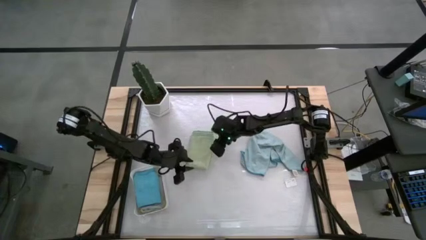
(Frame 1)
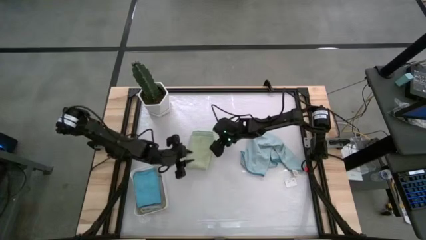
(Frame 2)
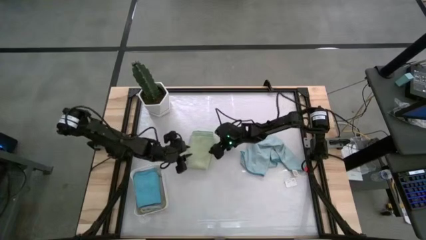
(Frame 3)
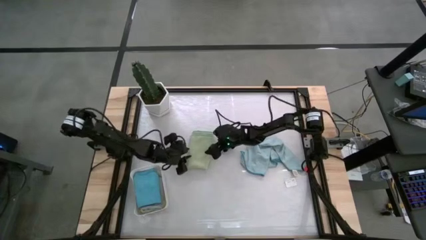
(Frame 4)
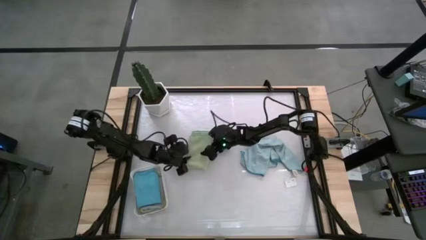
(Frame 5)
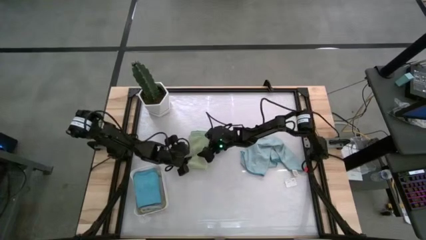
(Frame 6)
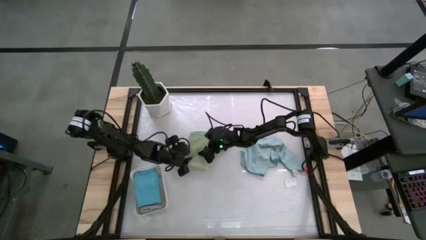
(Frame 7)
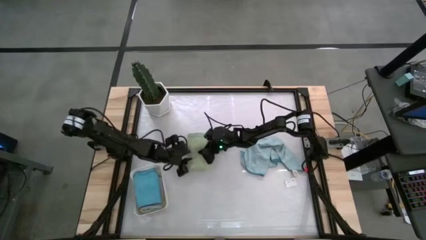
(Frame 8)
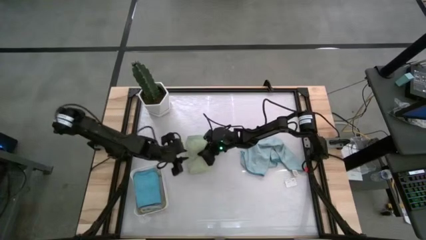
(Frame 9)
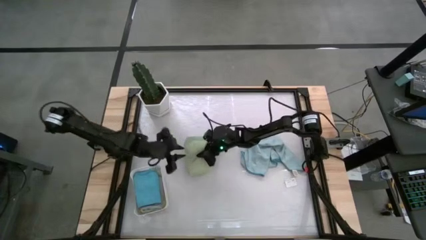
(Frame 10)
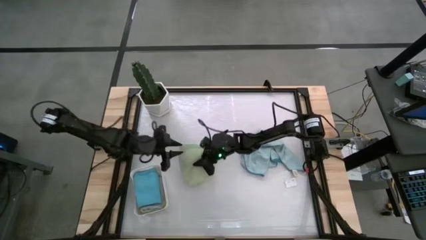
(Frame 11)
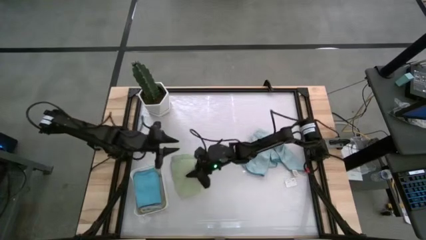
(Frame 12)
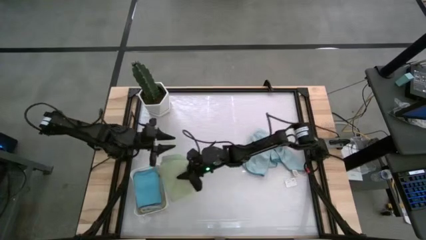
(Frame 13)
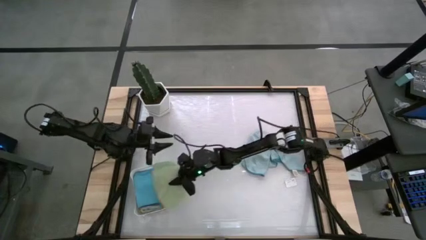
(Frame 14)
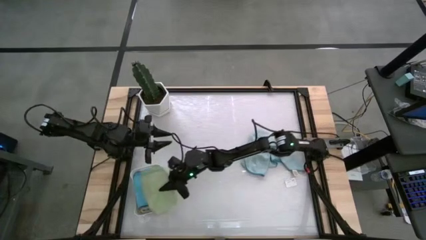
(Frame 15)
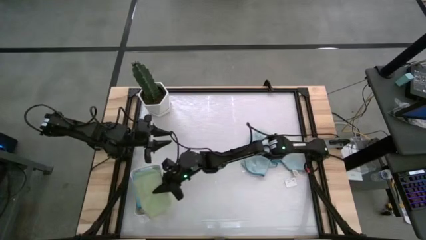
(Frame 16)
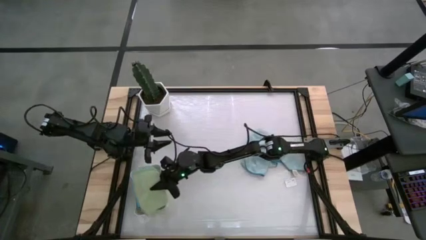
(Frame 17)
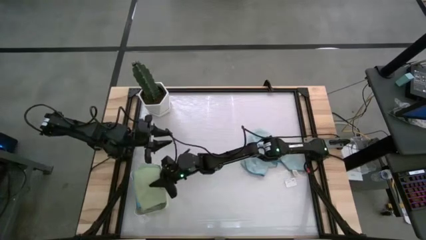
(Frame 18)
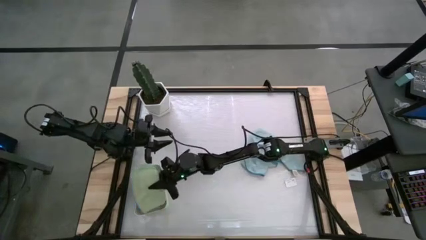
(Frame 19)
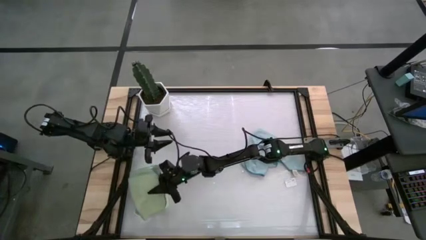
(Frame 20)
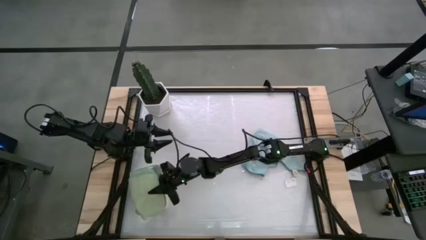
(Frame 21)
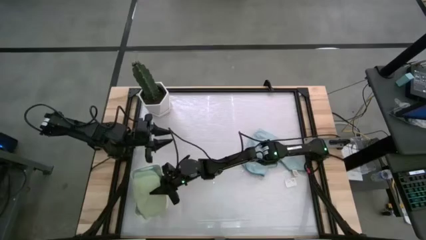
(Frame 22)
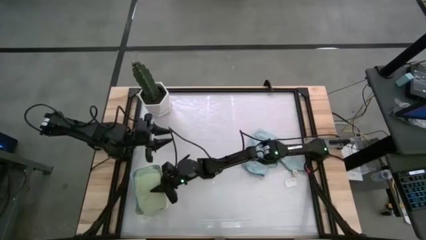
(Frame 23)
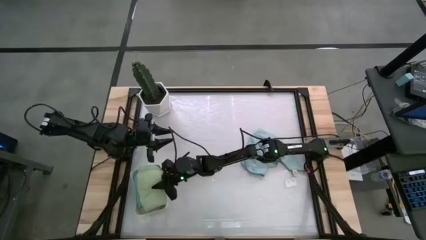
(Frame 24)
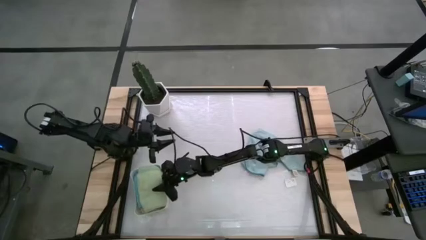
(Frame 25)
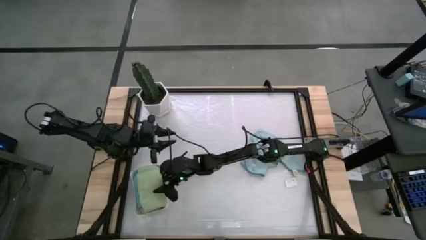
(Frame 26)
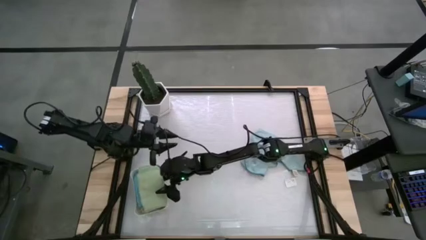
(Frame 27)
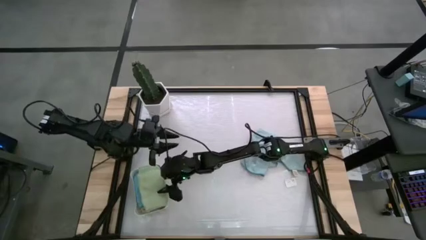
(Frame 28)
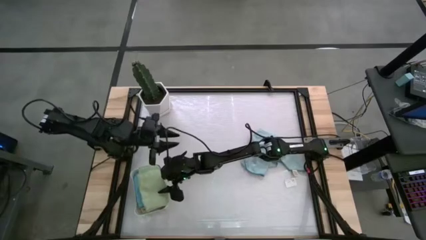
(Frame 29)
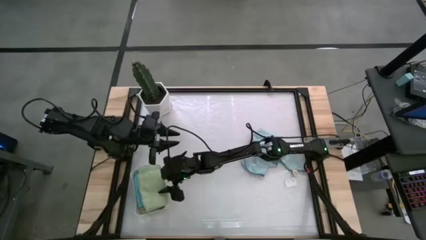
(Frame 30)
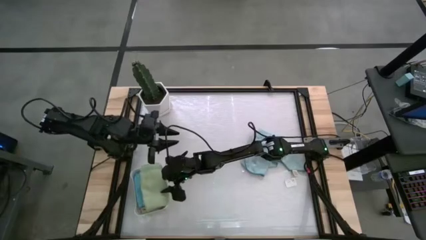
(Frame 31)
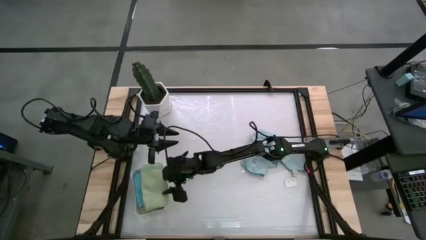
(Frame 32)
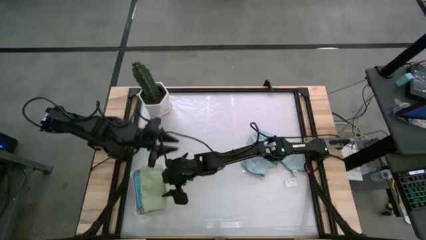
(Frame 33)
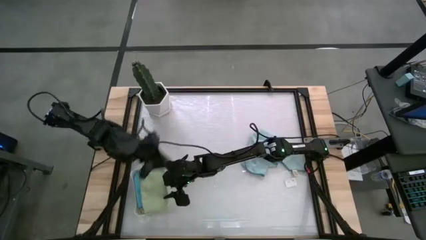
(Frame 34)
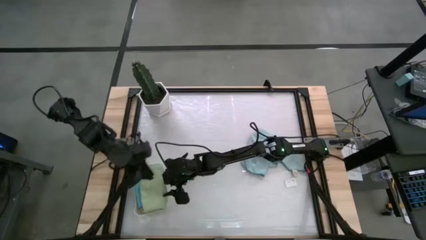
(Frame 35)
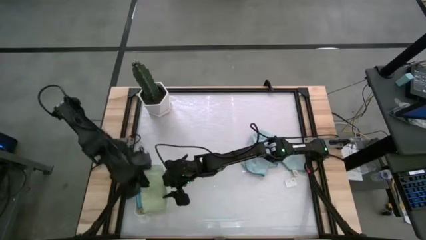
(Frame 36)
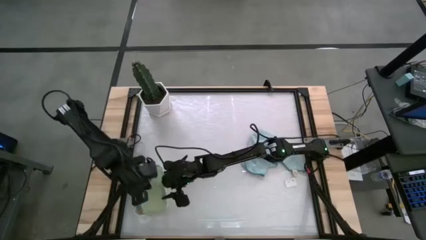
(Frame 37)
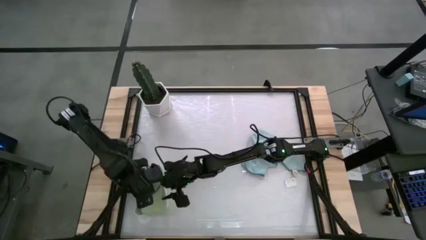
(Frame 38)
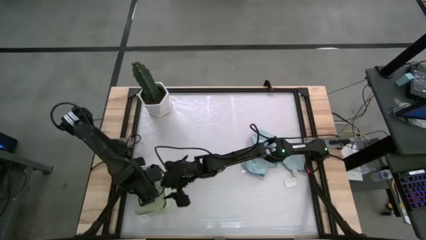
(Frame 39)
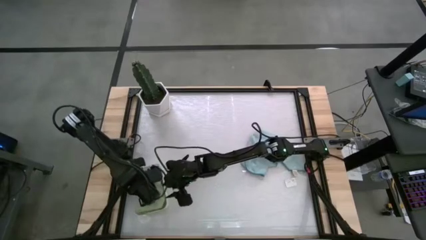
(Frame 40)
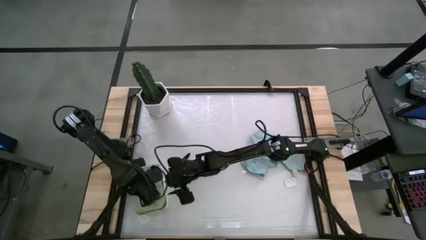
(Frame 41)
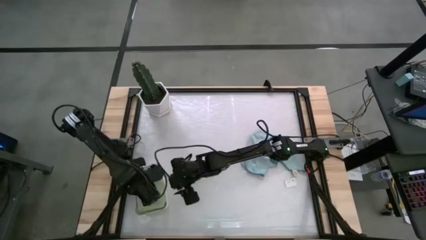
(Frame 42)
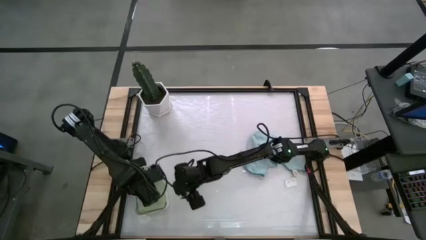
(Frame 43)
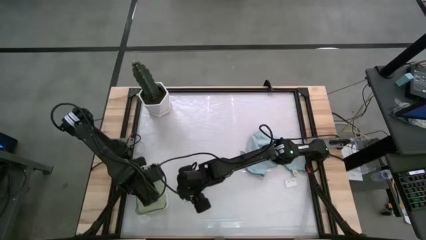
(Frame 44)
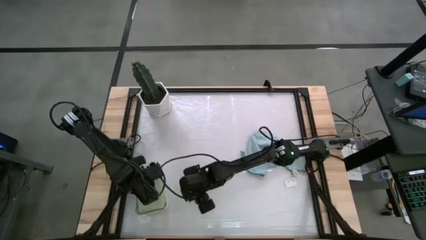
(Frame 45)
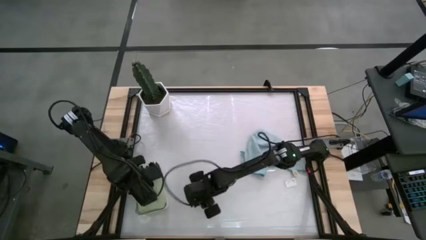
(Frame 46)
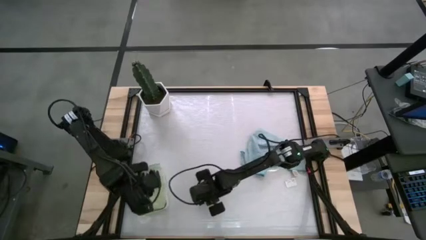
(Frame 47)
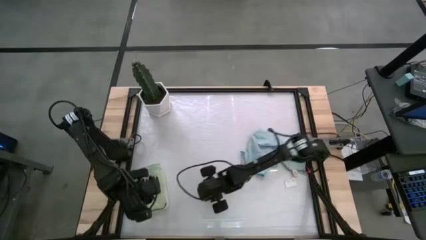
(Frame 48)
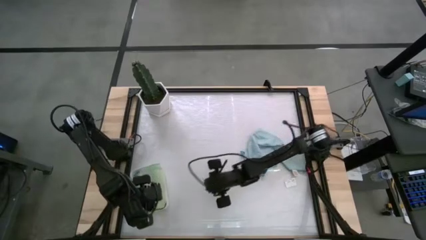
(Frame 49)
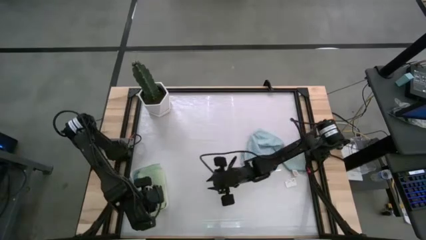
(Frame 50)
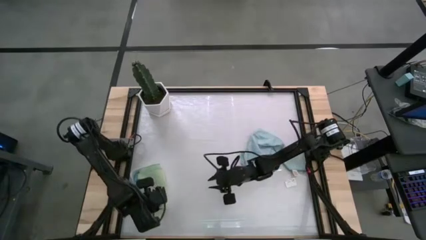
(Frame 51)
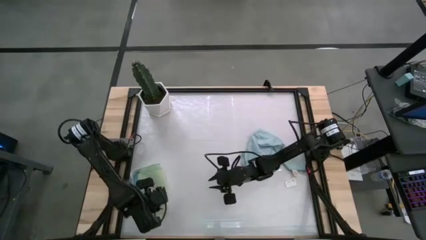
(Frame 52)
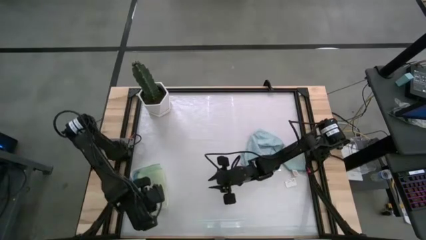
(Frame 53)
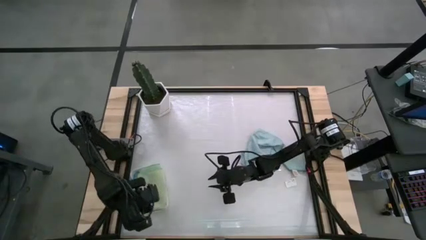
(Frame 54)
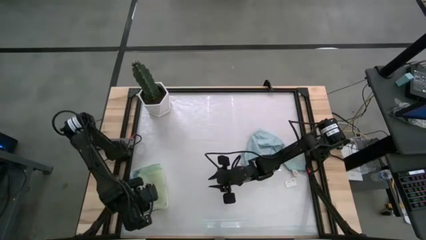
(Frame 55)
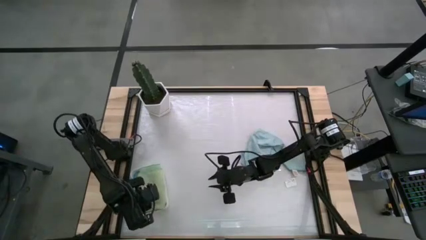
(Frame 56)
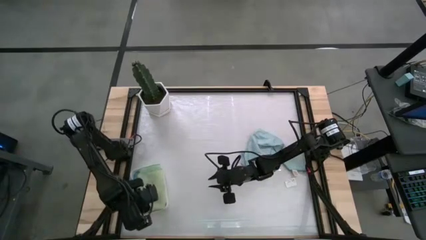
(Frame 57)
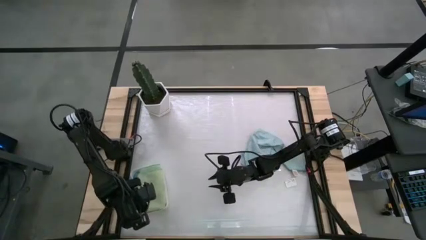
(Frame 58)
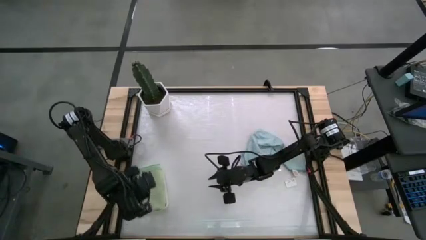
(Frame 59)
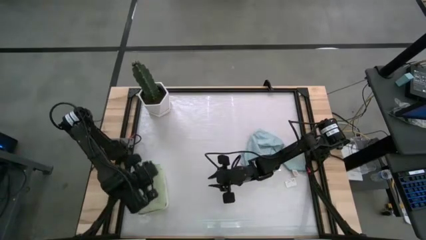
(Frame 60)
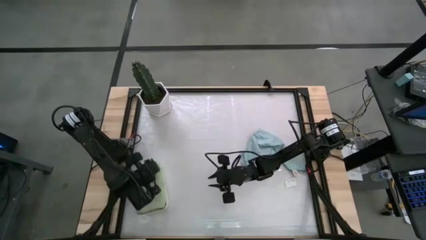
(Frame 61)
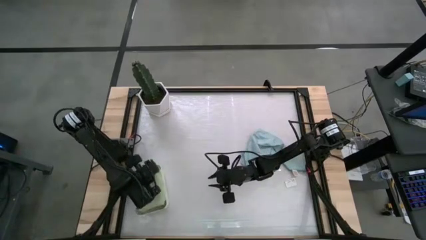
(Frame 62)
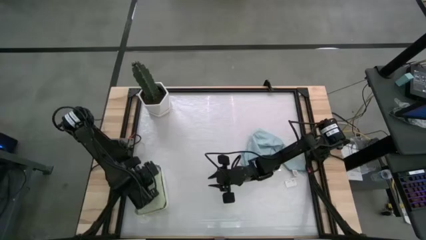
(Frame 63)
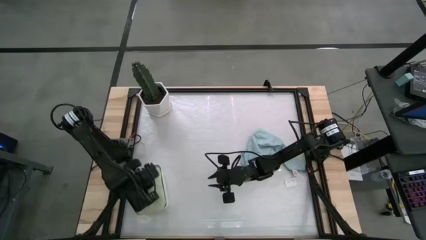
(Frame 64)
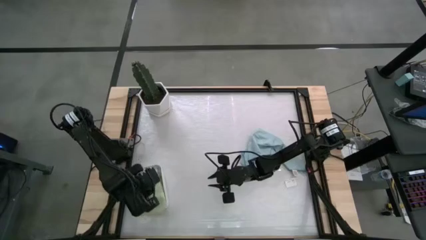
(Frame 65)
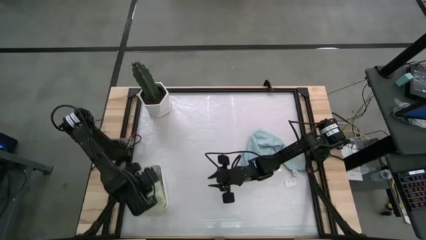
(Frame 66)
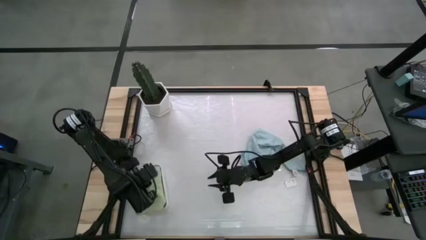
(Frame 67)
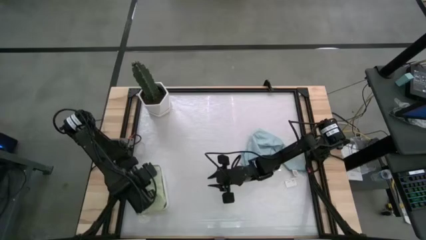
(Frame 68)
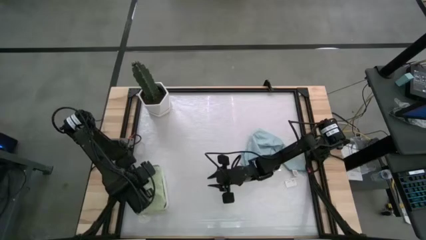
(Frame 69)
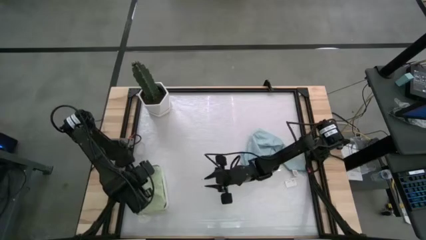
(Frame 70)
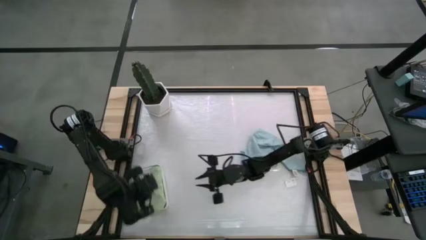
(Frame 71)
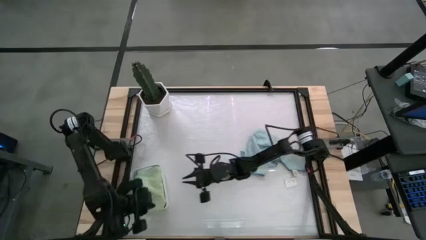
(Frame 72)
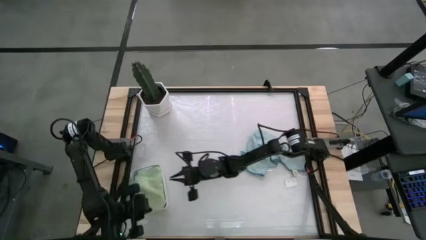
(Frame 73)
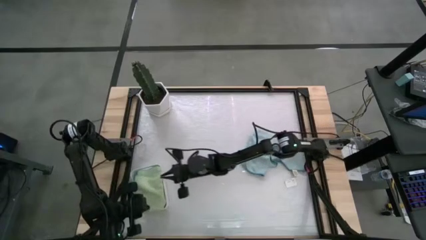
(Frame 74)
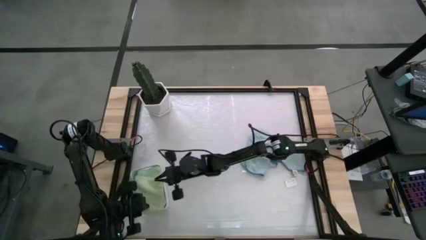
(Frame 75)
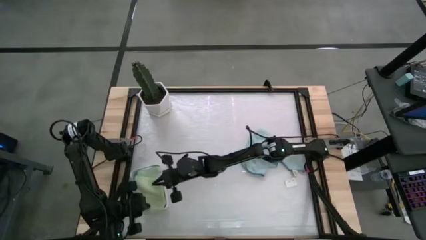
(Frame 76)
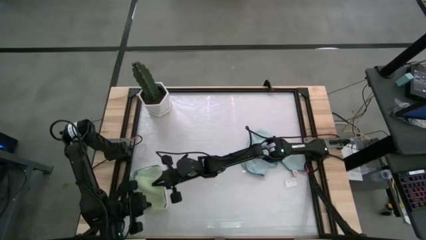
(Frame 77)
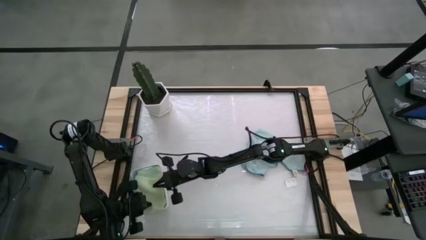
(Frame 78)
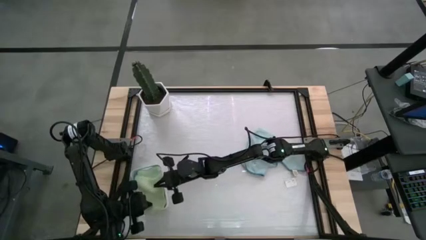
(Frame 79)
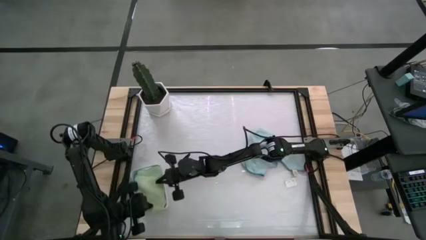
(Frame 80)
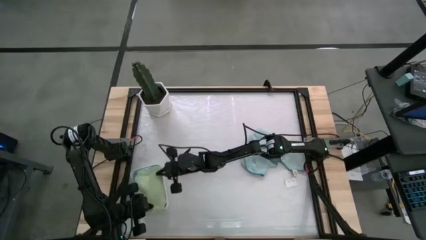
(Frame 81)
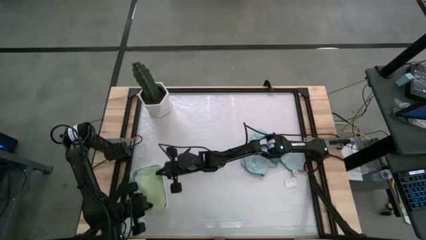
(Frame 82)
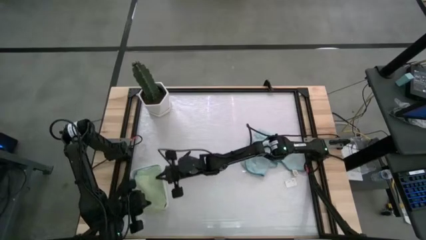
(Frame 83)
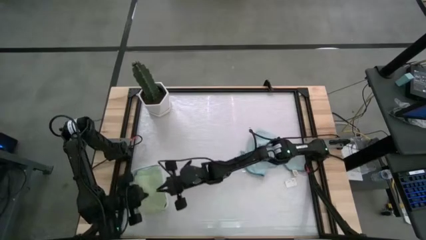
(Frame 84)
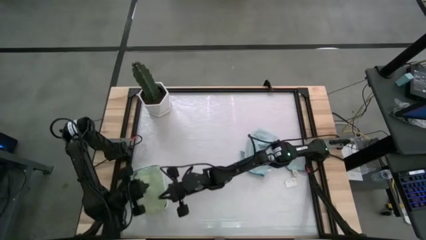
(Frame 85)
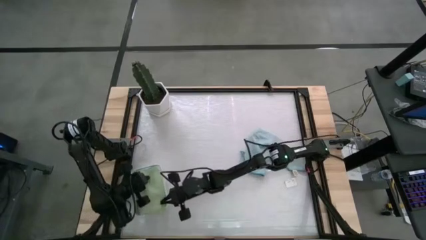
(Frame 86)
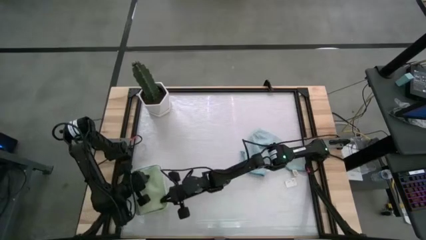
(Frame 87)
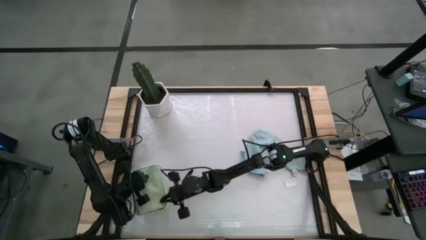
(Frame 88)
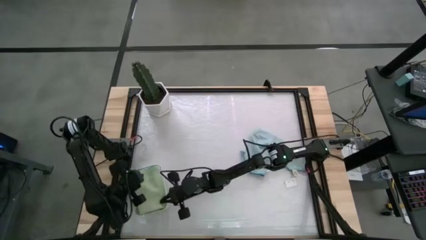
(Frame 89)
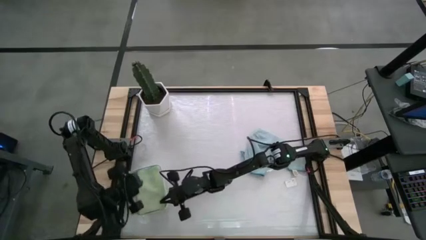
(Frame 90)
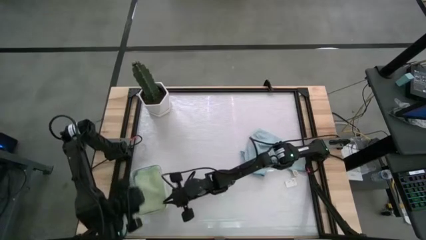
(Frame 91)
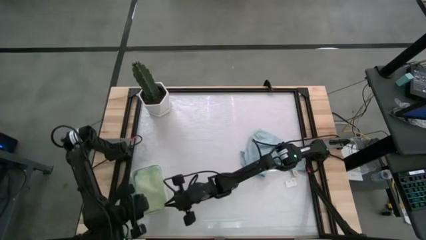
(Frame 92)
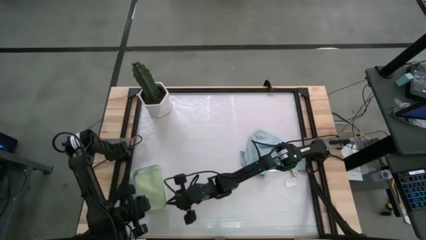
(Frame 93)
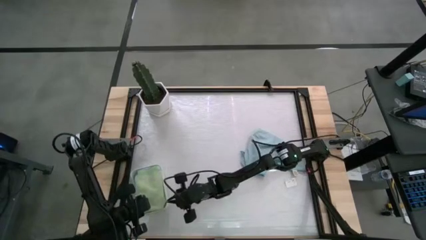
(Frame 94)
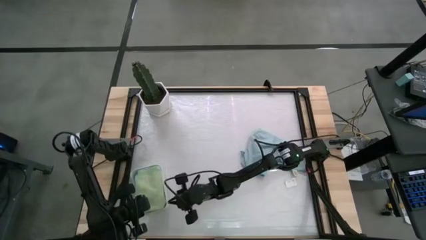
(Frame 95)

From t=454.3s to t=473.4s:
Task: Fold microfiber towels
Put the green microfiber towel into the white bin
